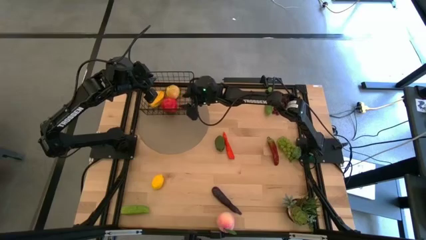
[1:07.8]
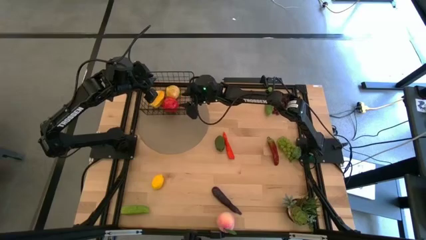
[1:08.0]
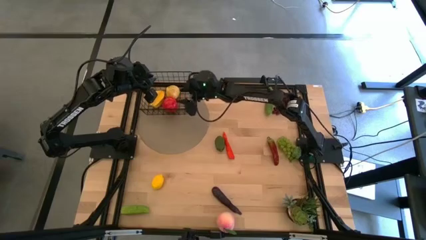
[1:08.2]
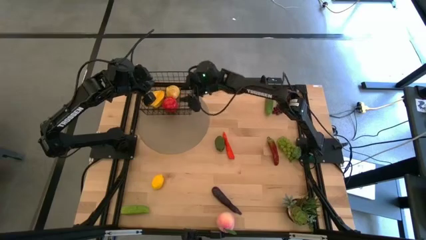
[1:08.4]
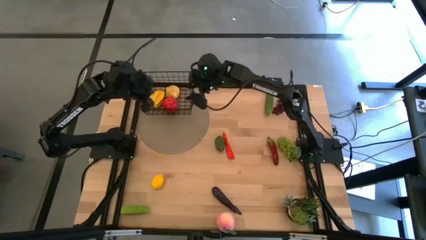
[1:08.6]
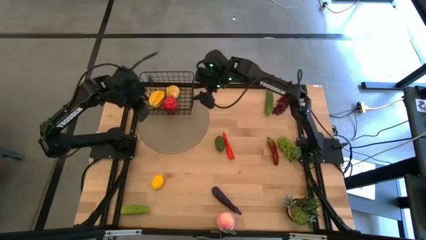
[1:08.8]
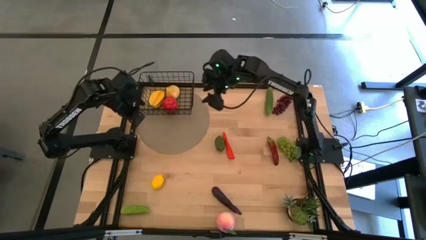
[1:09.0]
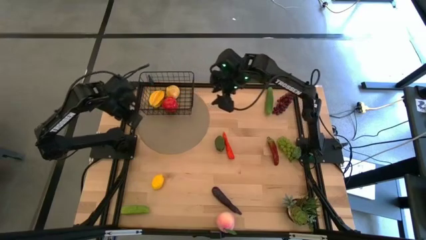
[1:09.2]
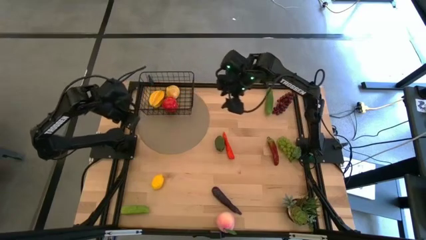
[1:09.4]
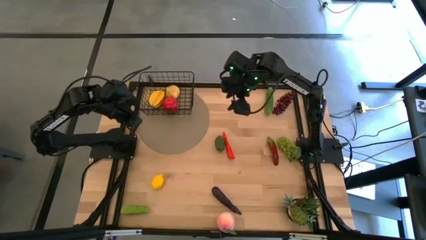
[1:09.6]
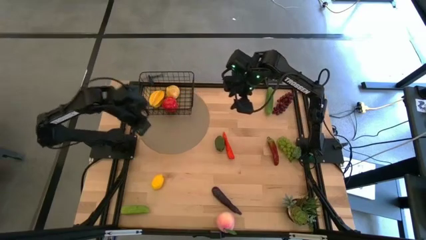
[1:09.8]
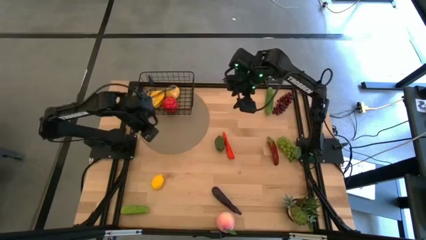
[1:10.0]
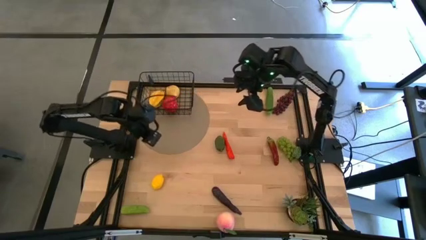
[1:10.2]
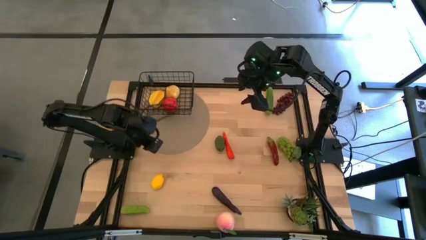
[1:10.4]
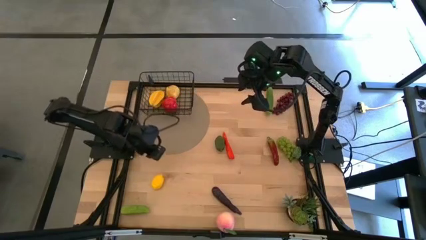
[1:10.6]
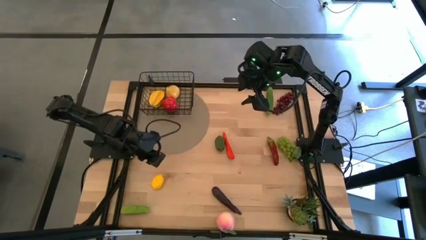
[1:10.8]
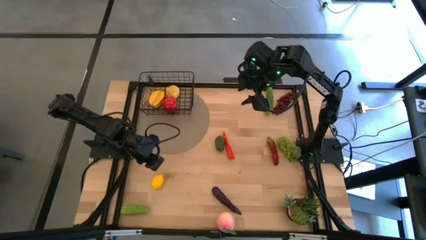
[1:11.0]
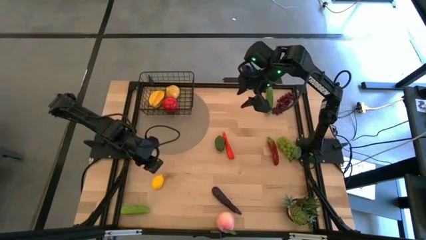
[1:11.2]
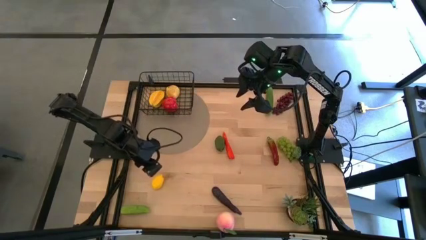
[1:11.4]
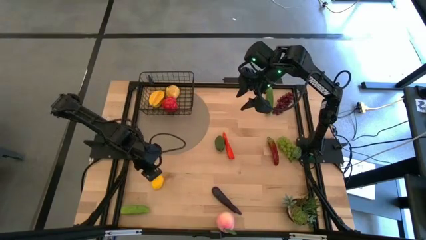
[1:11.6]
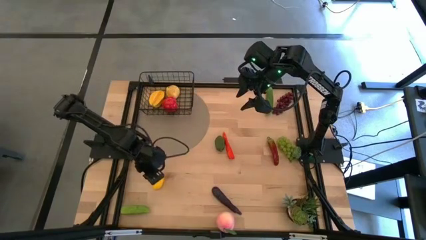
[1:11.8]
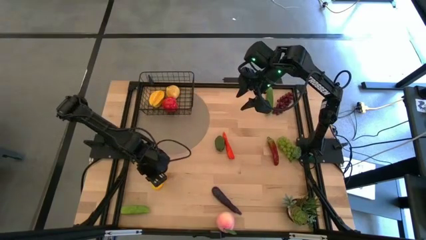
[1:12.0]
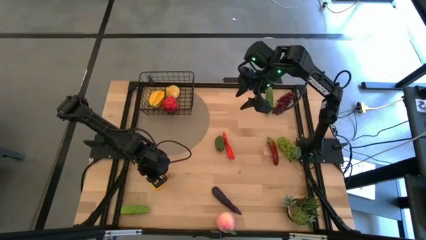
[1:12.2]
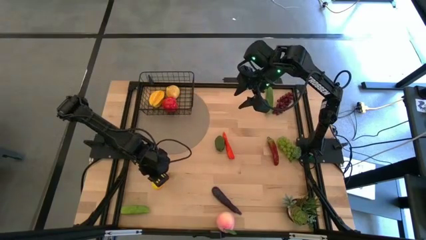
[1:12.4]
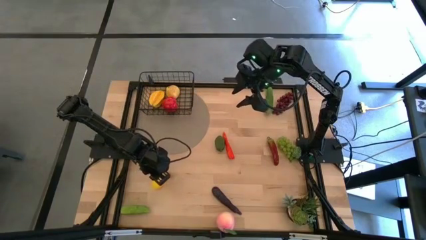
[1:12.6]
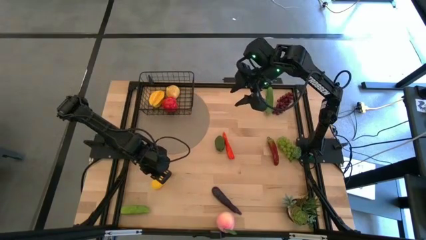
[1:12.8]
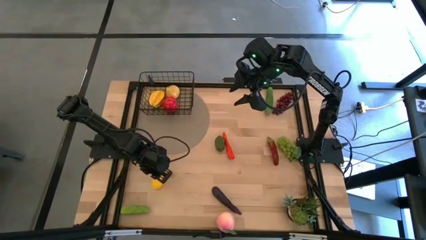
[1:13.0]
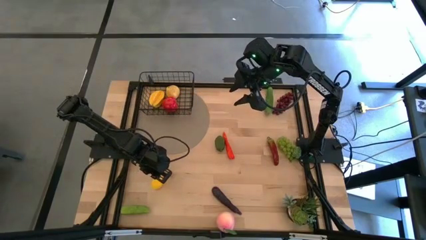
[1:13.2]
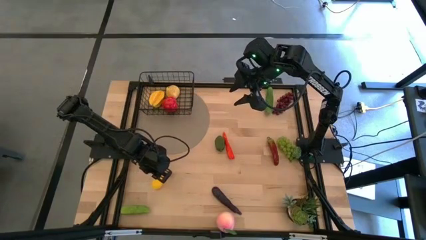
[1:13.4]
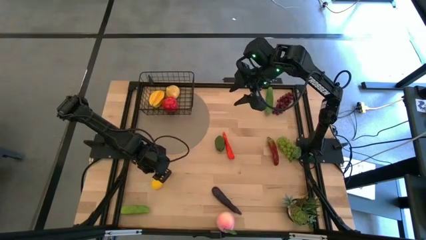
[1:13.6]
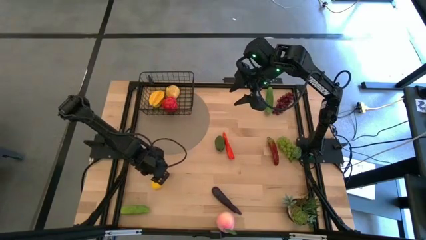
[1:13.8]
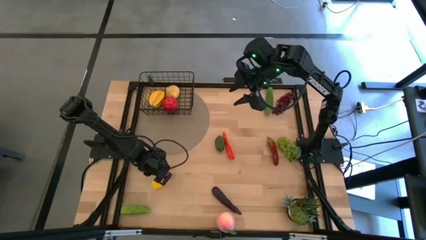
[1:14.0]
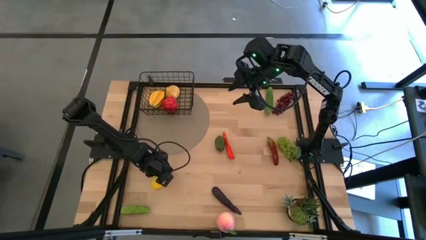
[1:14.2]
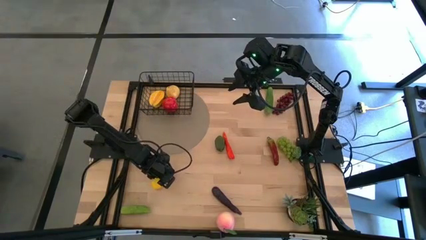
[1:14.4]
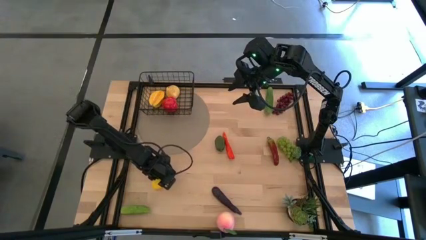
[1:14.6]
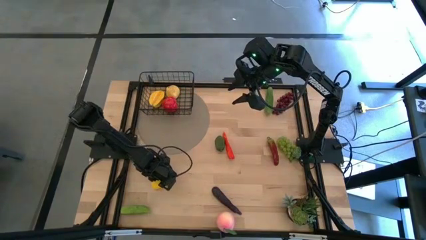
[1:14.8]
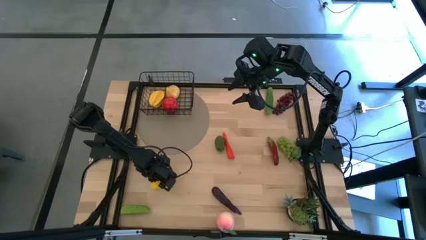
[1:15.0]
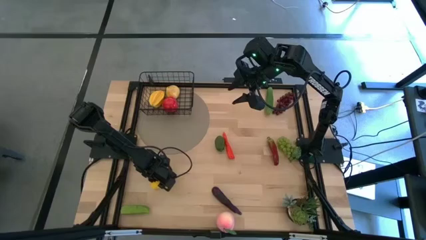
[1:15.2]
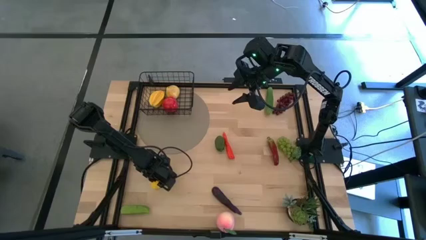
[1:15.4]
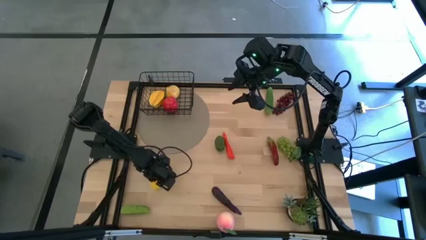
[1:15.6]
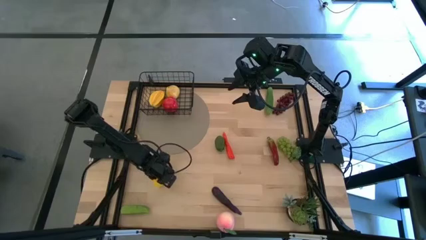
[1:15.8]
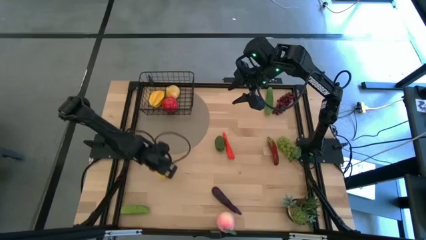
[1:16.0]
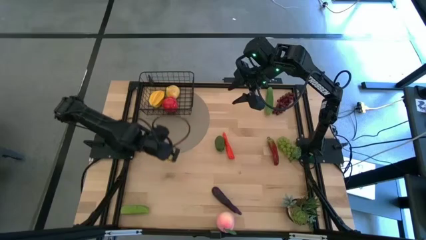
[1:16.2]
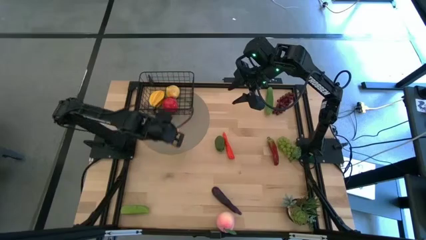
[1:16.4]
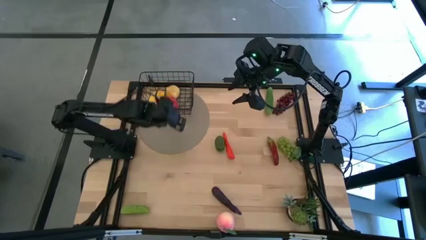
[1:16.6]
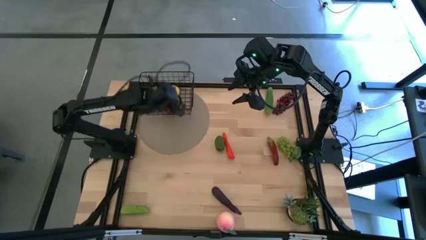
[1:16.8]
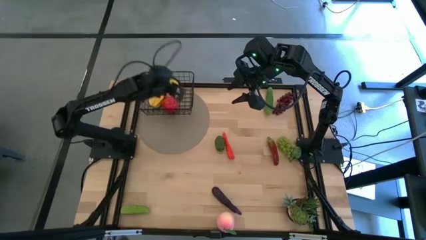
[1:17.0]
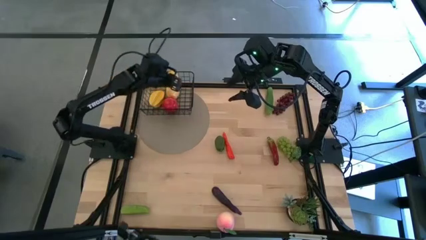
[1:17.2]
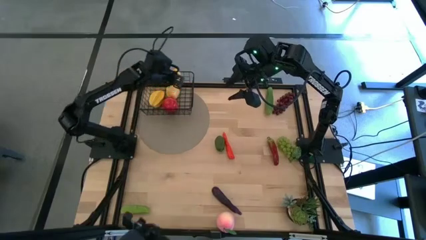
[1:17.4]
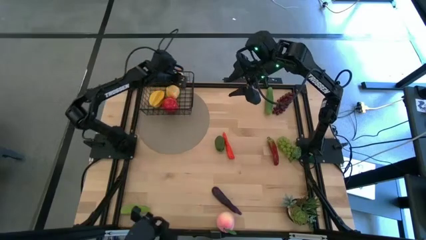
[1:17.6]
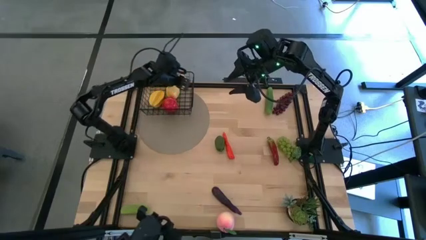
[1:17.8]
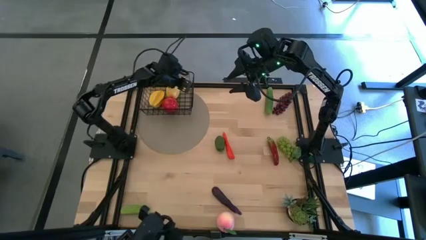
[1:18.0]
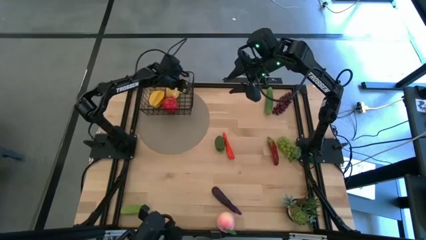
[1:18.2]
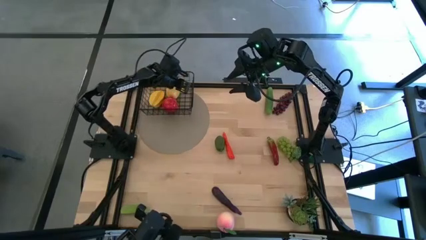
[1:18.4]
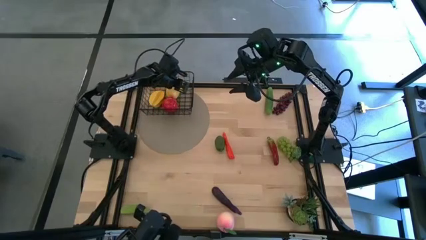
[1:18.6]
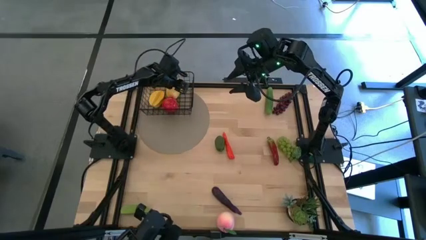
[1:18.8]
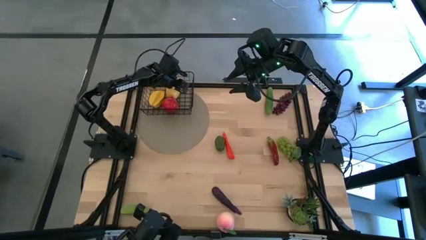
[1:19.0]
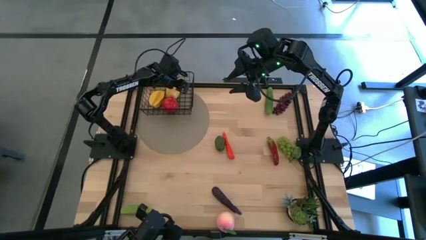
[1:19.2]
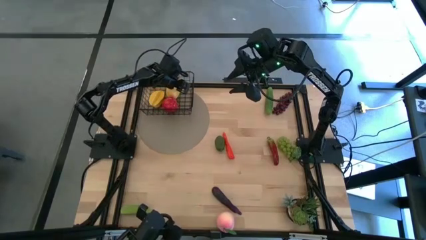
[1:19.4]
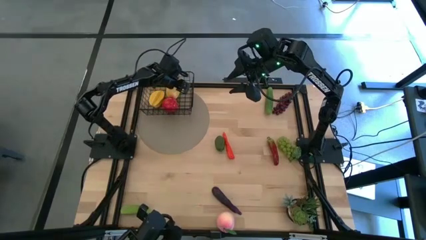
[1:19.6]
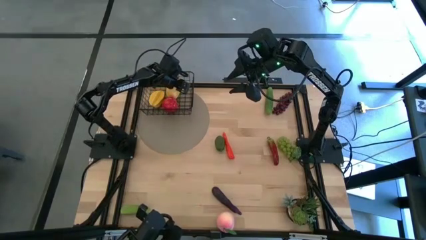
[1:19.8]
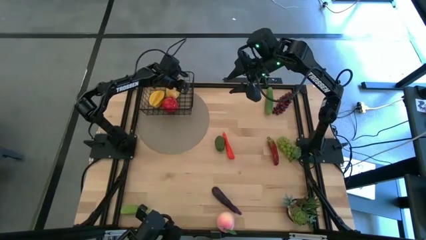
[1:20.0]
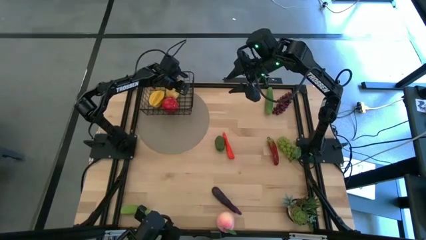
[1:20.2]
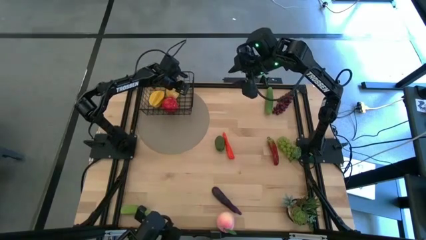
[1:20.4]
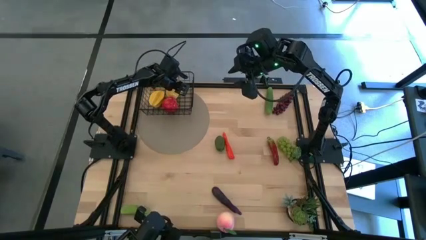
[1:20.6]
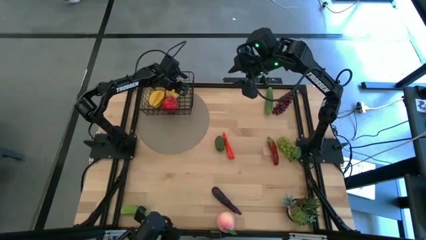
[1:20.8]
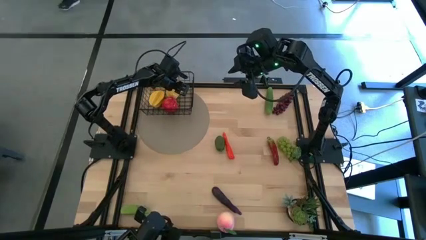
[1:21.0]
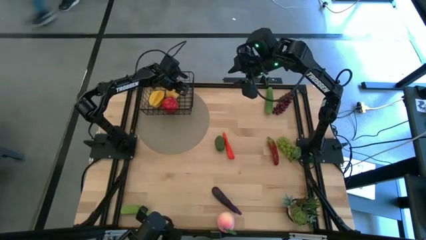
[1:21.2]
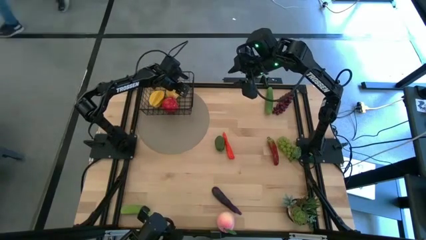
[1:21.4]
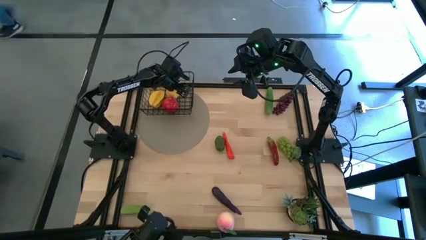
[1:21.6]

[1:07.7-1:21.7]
Task: Build produce basket
Put the yellow lemon into the black wire basket

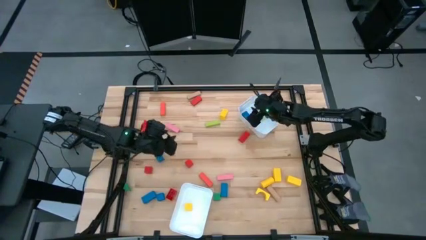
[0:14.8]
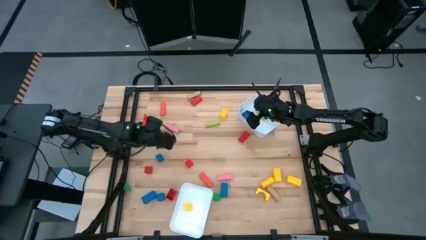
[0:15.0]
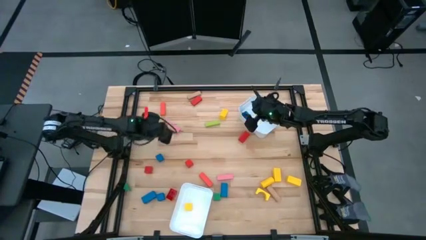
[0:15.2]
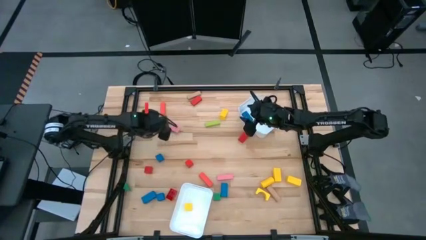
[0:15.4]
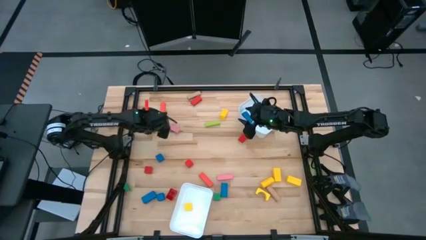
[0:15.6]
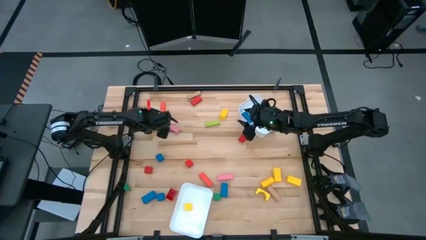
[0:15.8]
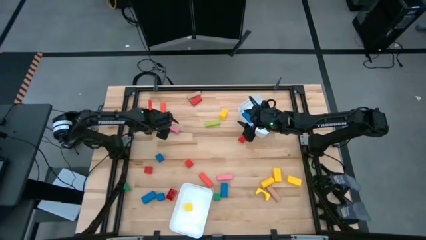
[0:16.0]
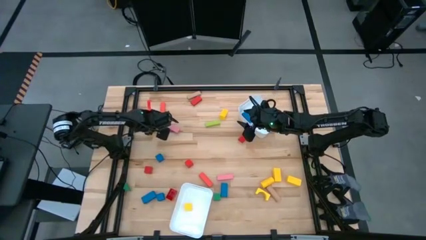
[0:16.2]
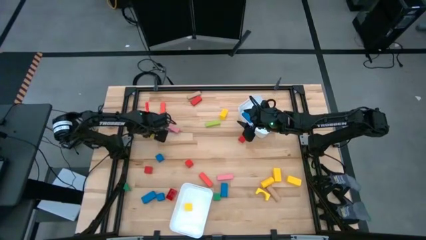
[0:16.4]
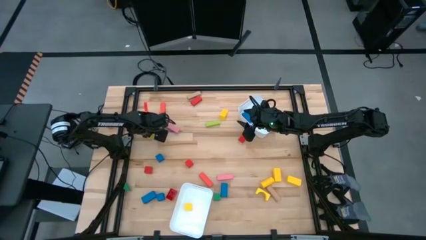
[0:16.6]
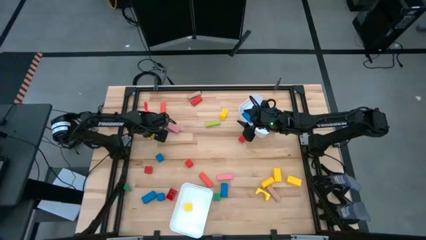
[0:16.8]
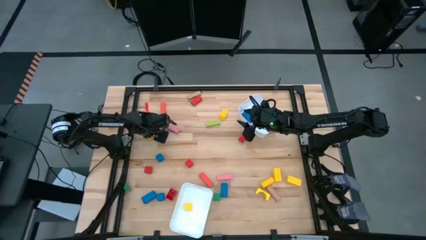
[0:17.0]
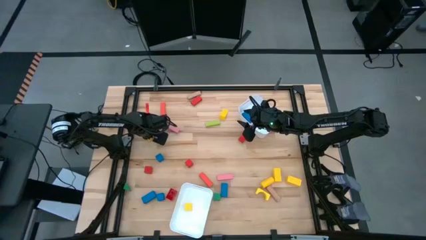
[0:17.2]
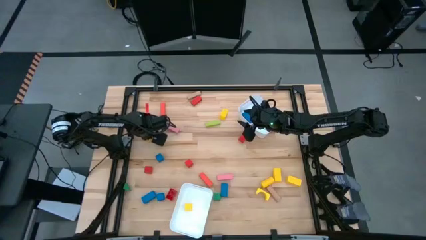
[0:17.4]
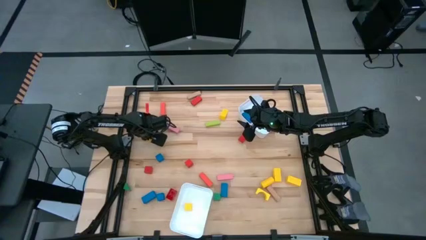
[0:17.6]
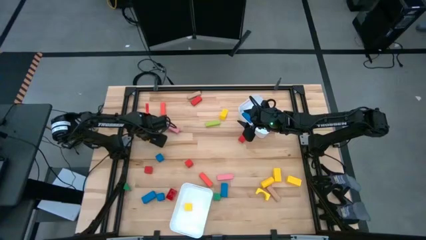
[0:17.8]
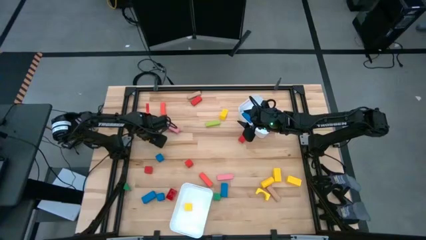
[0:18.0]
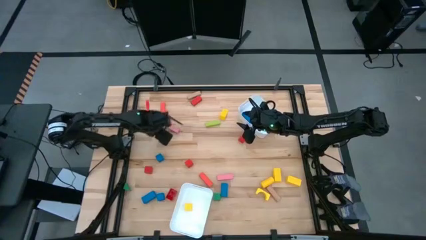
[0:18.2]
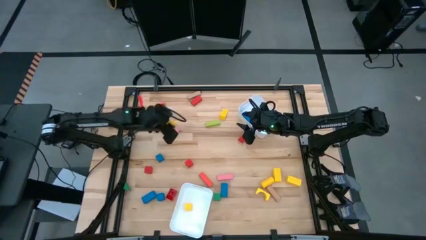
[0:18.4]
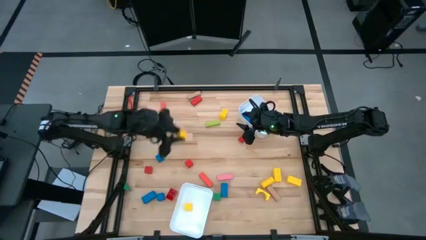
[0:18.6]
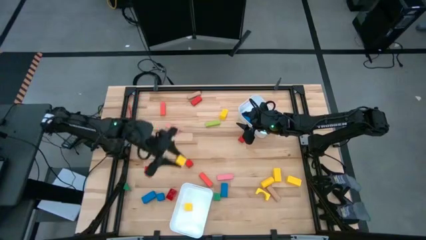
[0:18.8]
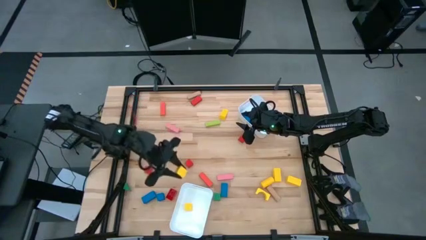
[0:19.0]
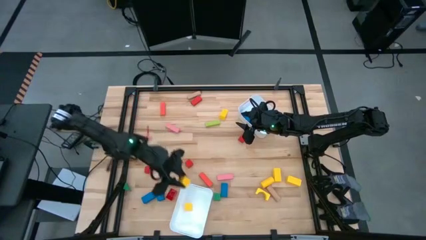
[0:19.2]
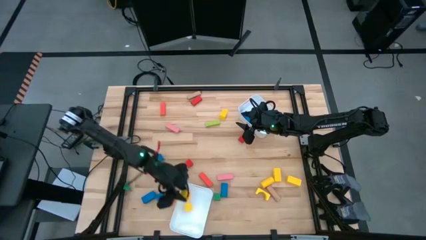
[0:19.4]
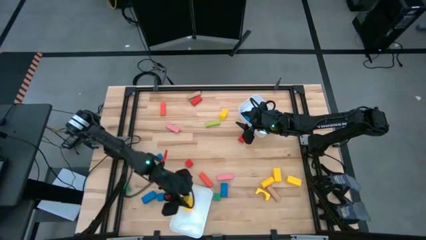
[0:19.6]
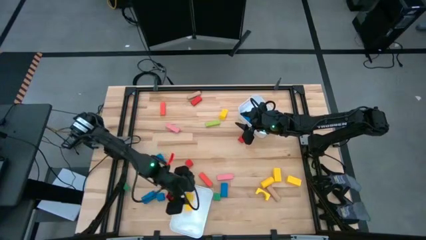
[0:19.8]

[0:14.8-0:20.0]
Task: Sort blocks by size
Put the small yellow block into the bottom white bin
